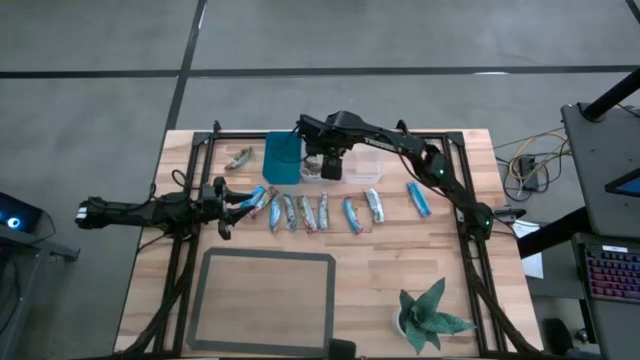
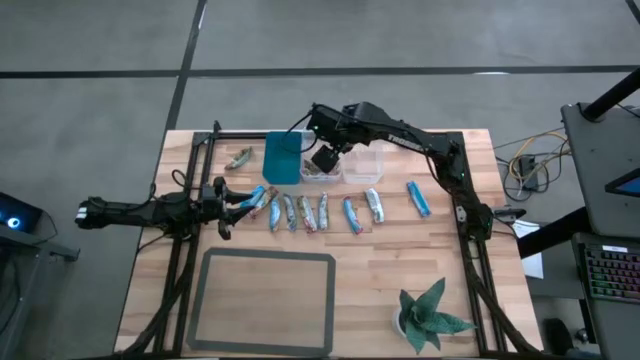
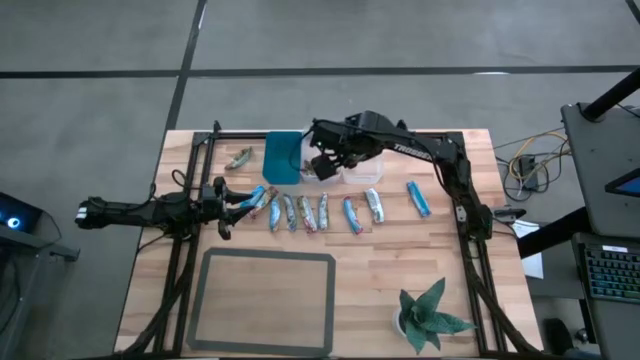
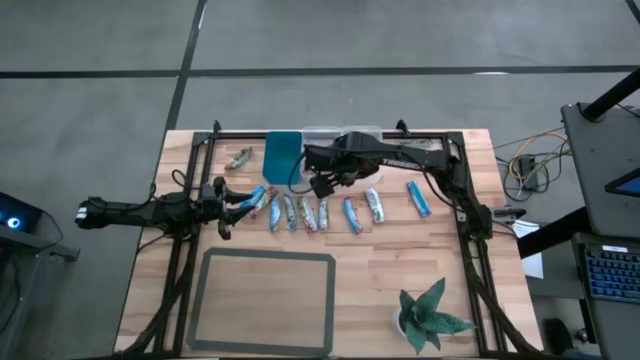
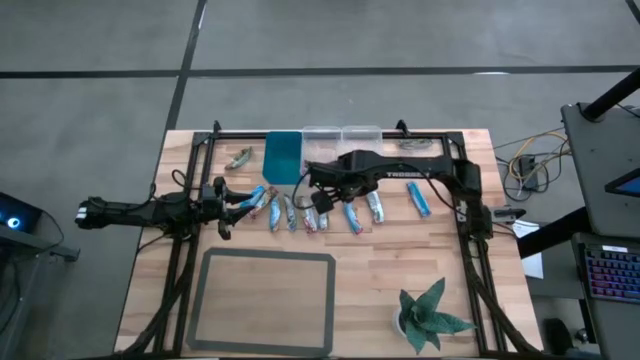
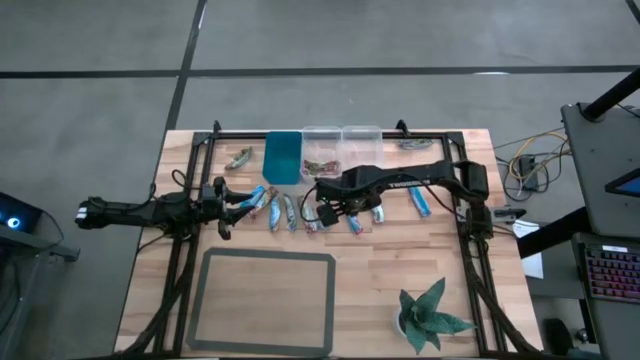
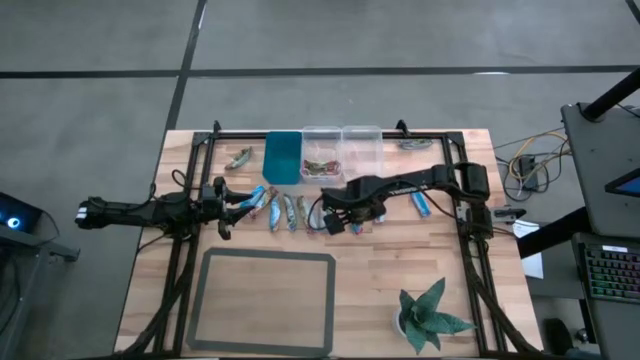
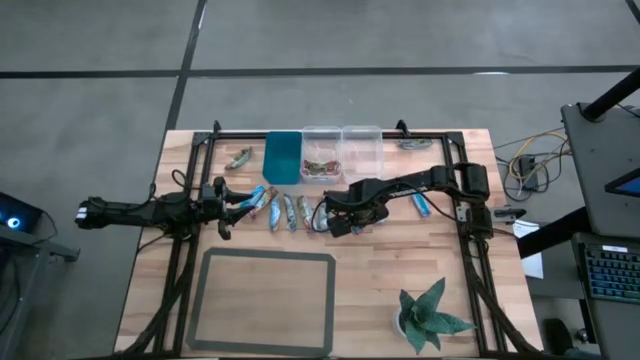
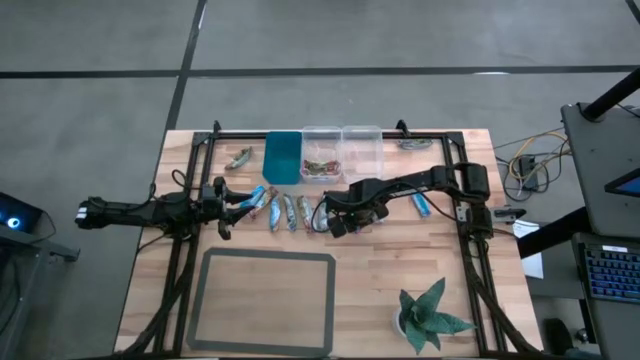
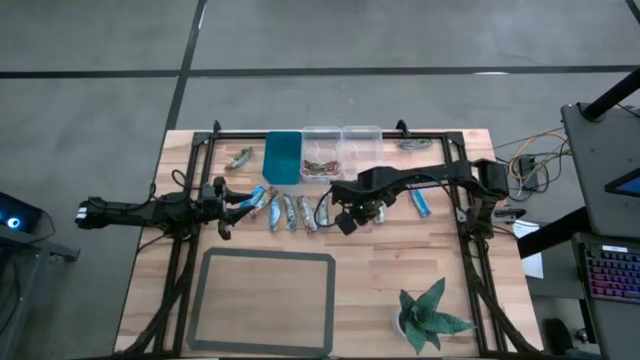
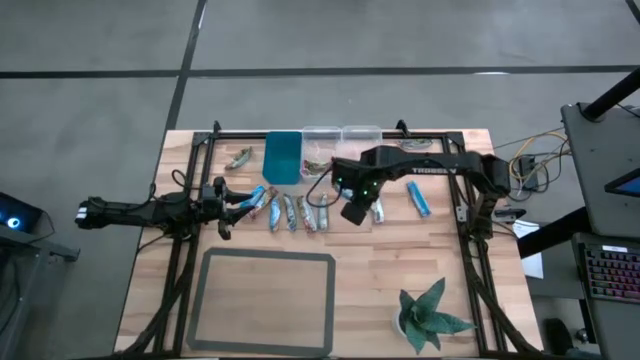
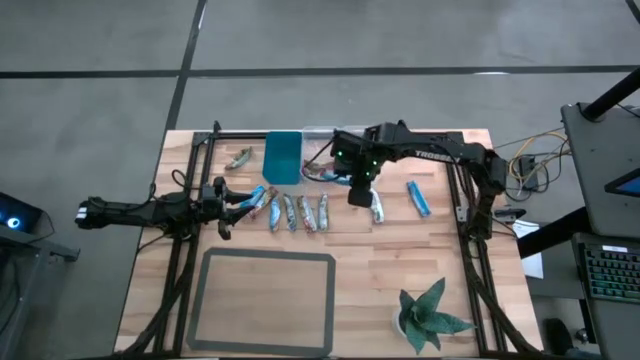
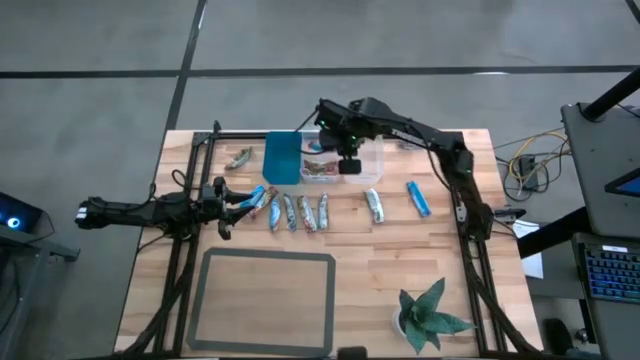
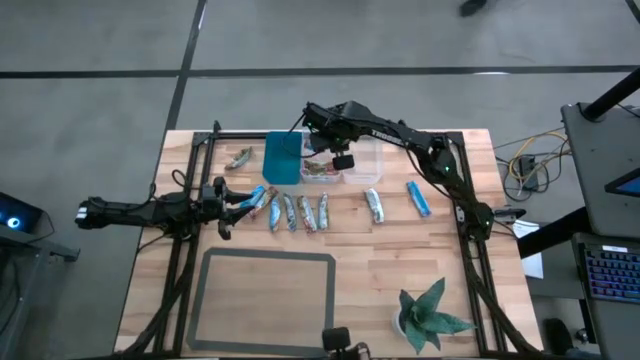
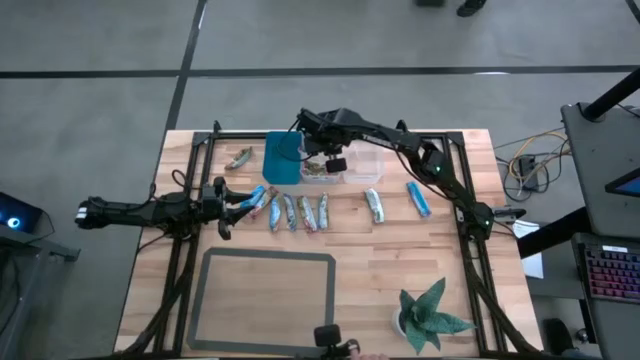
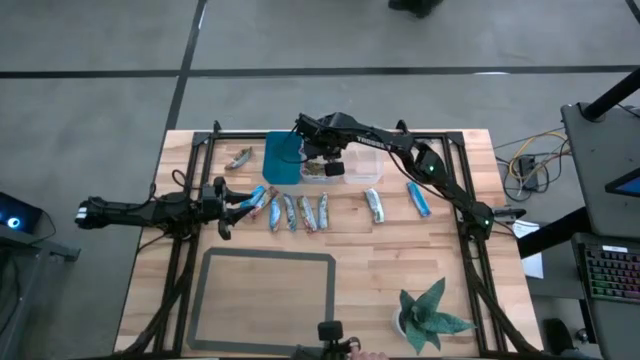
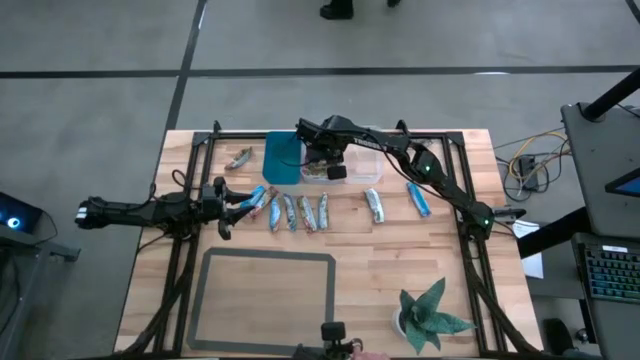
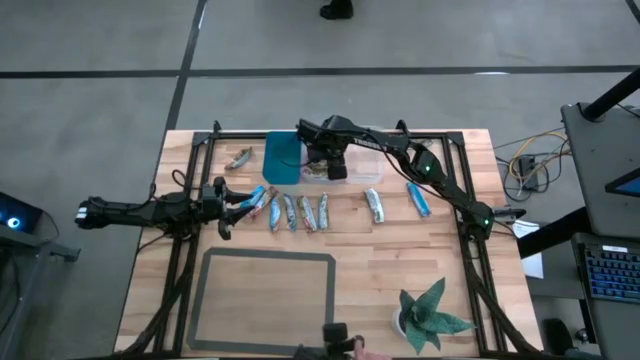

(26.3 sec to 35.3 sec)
Task: Pick and place Granola Bars by type
Put the red granola bar into the left transparent bin

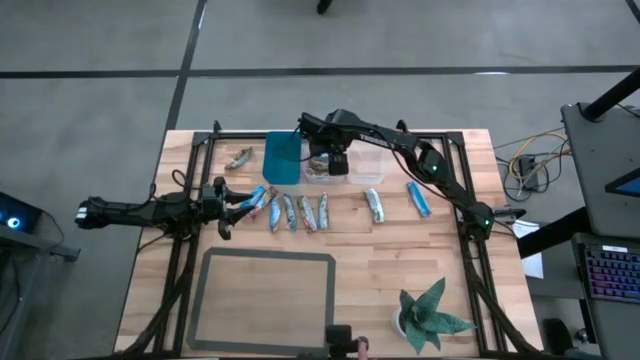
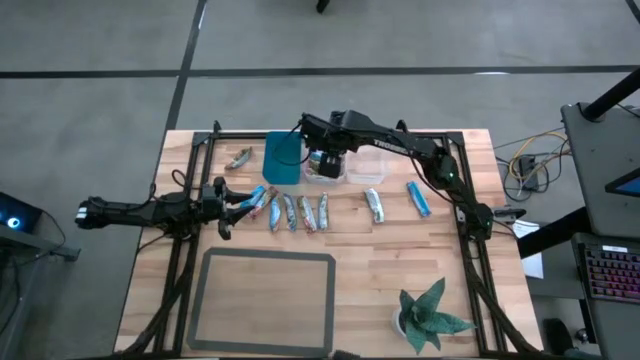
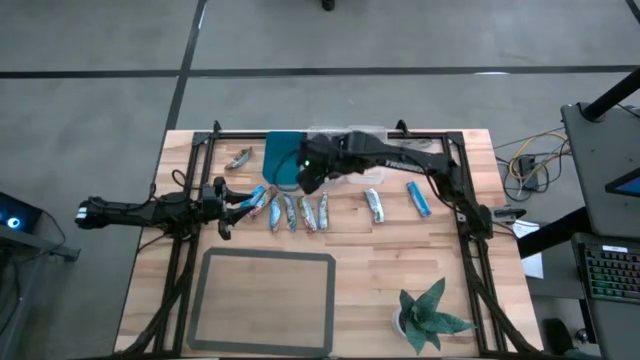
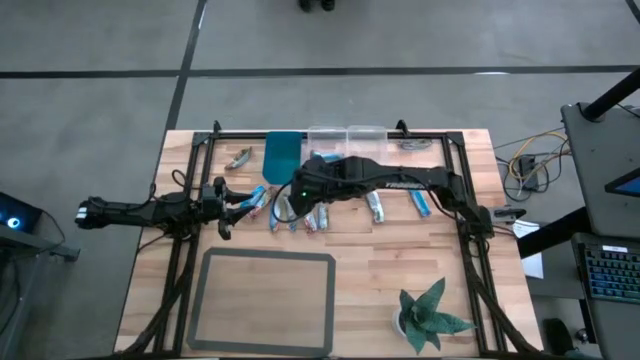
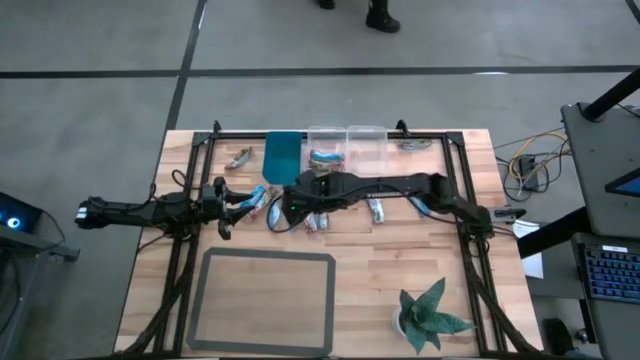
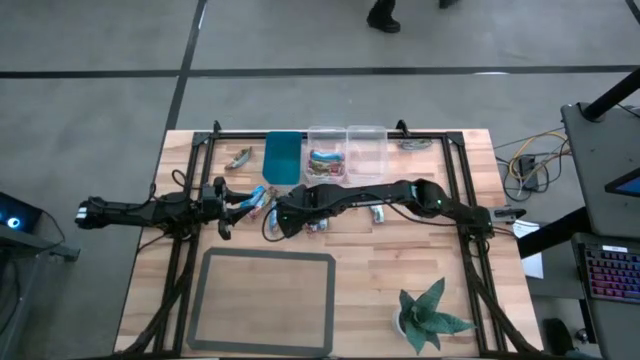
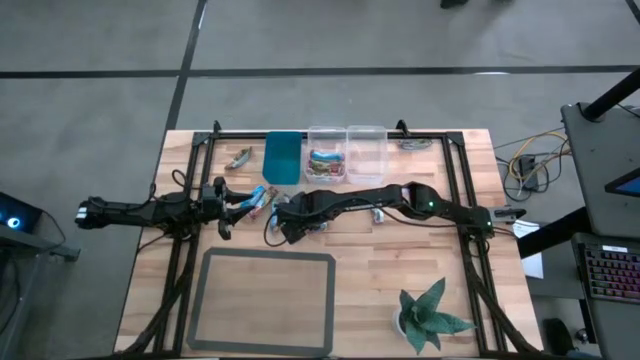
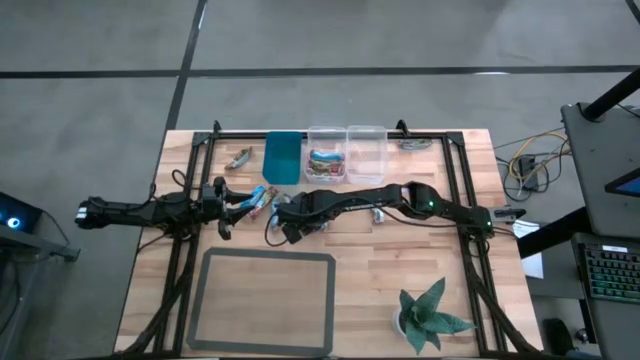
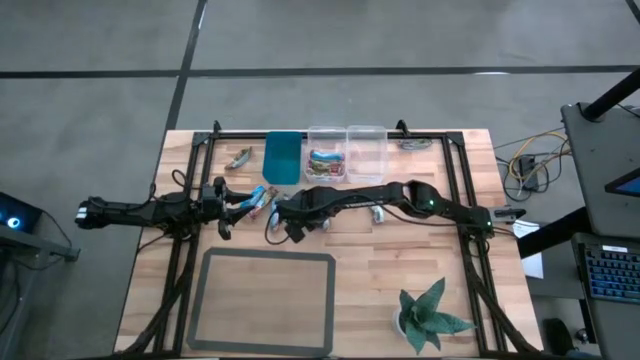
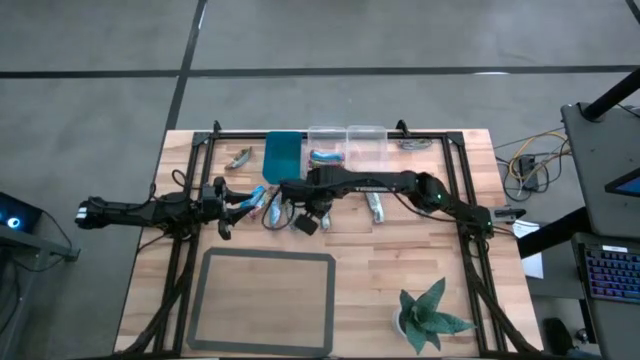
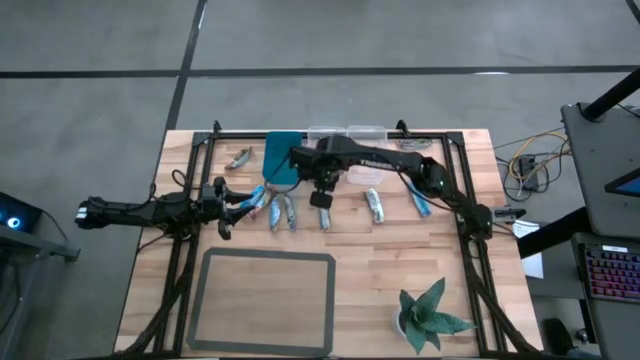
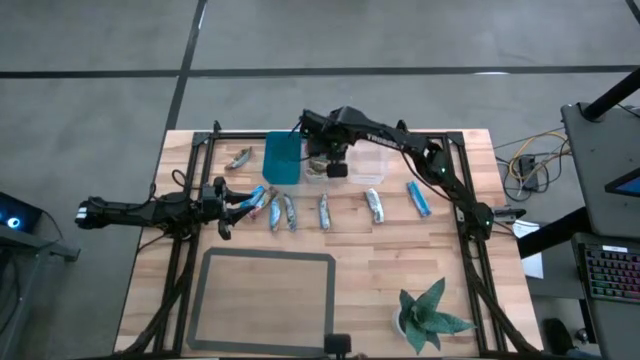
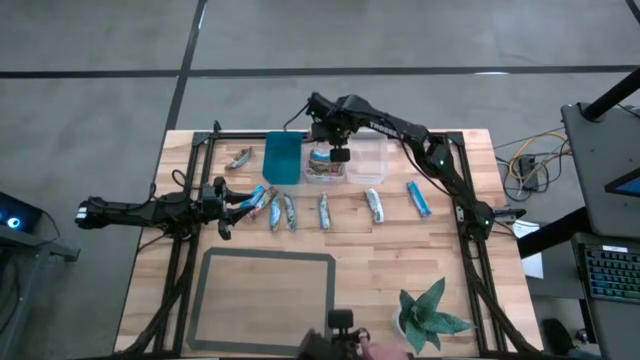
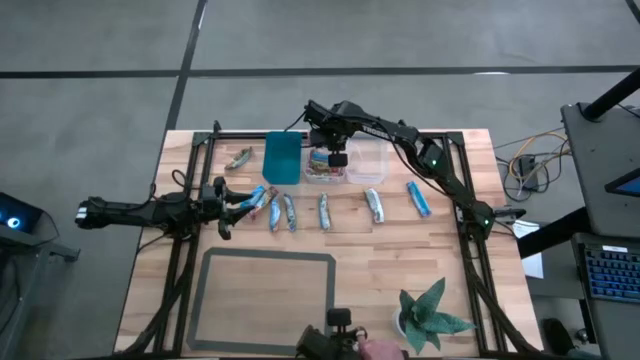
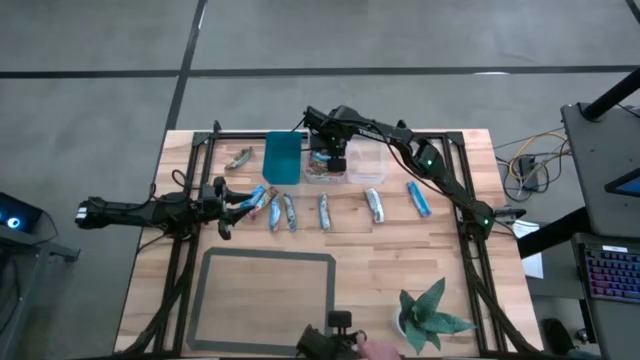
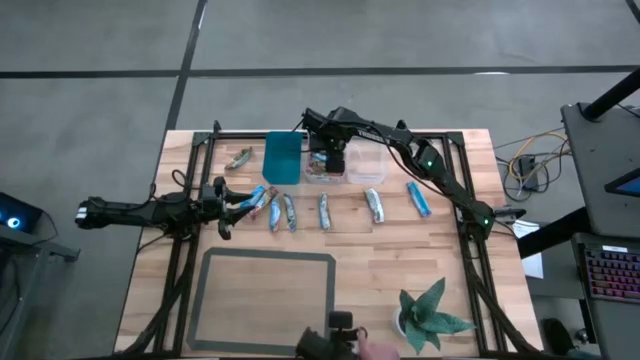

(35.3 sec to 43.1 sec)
Put the red granola bar into the left transparent bin

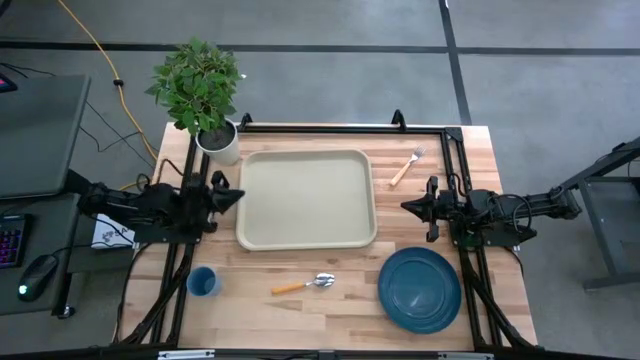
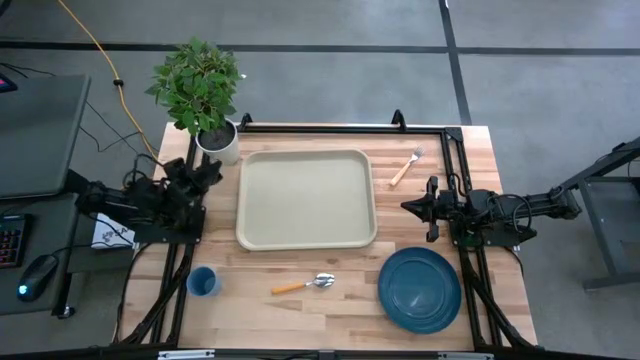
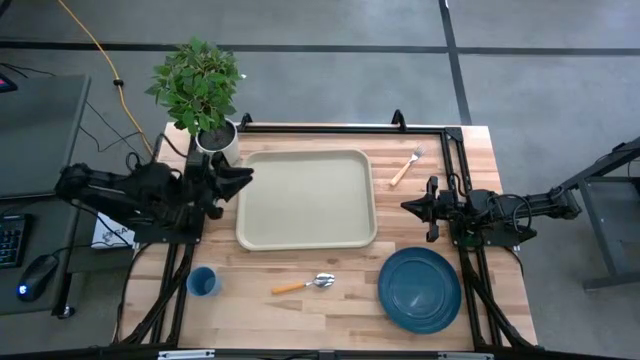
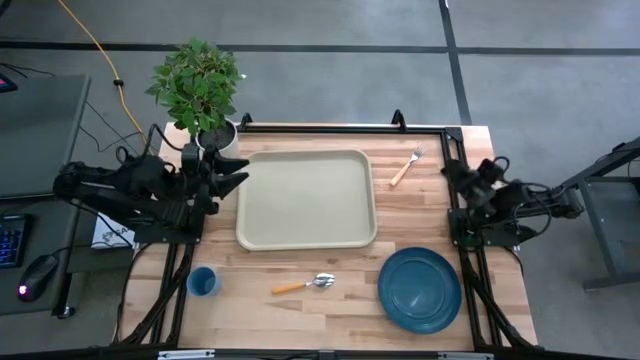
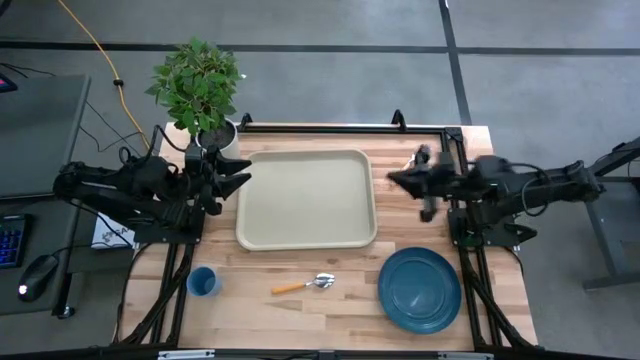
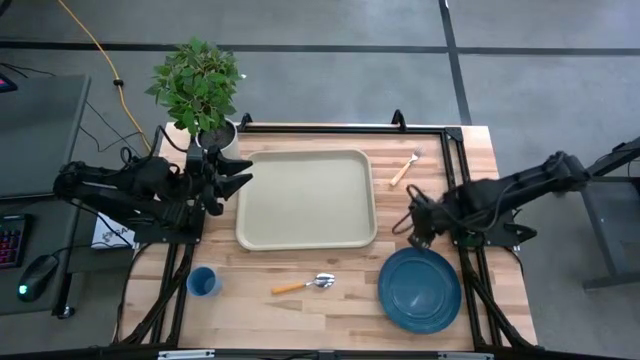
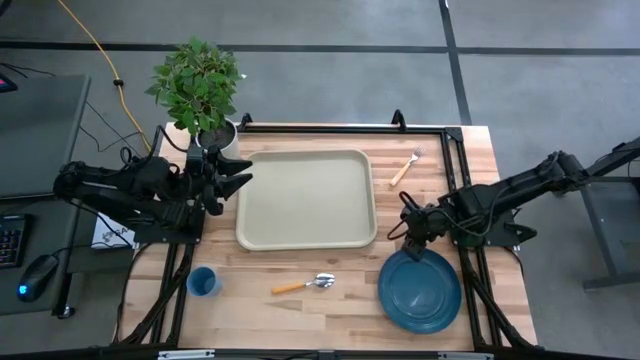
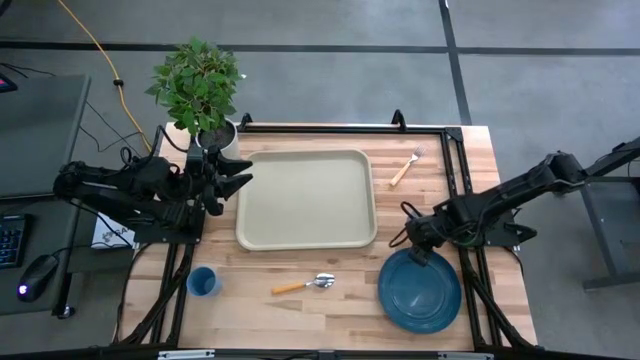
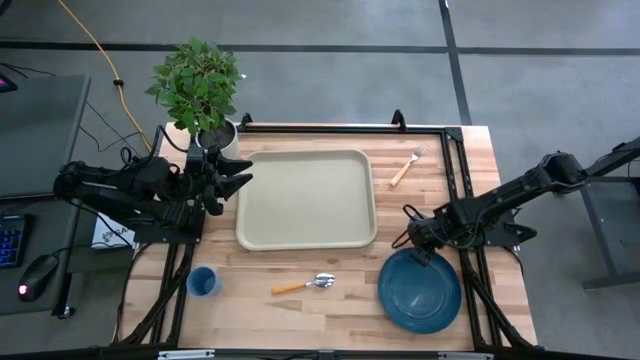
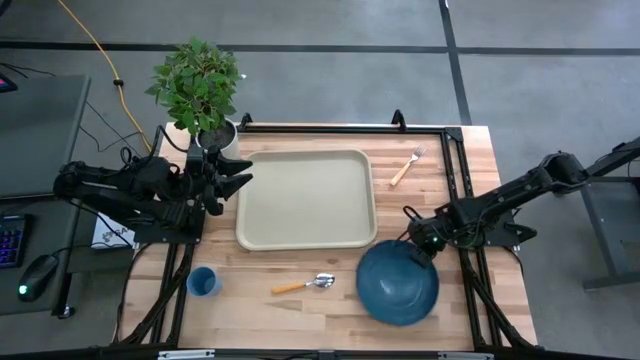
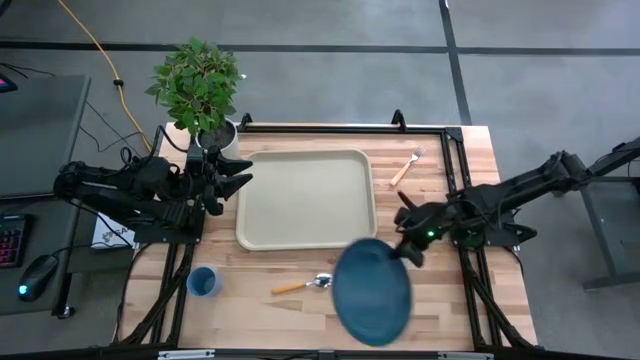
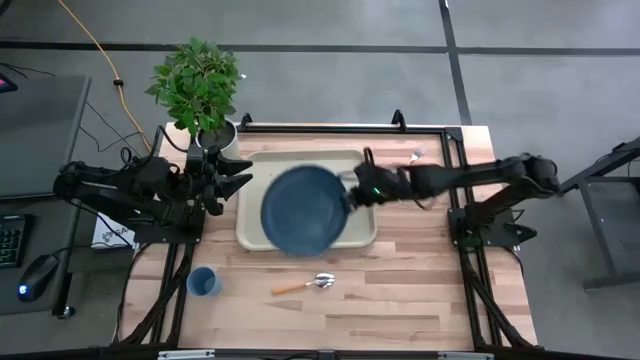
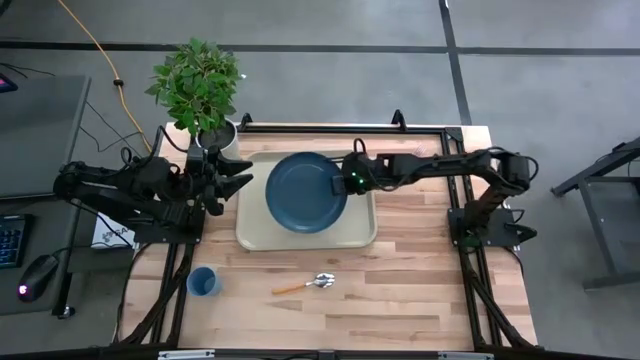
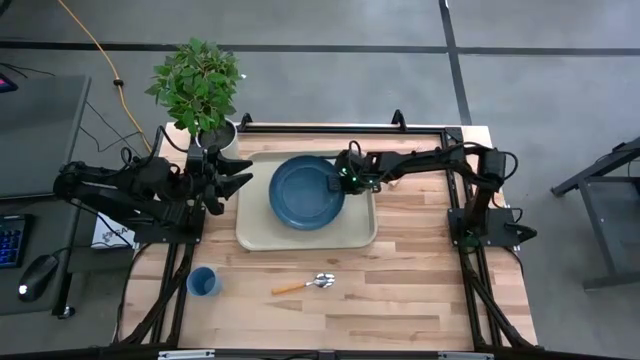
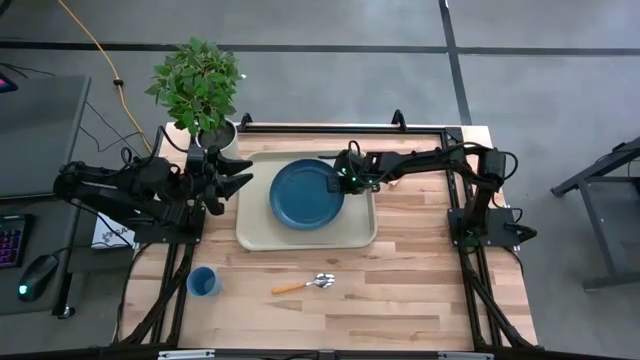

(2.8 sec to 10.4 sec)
Task: Pick and place plate/cup/fork/spoon on tray
Put the plate on the serving tray
